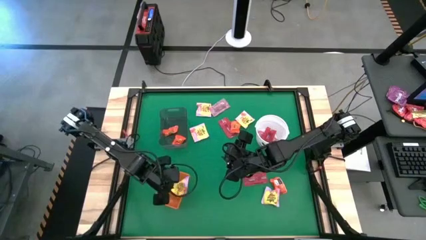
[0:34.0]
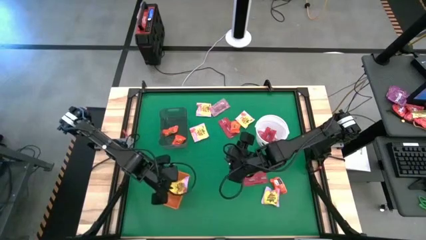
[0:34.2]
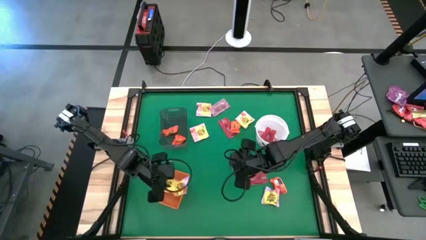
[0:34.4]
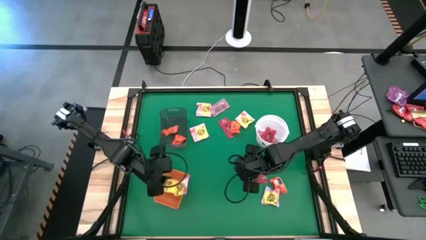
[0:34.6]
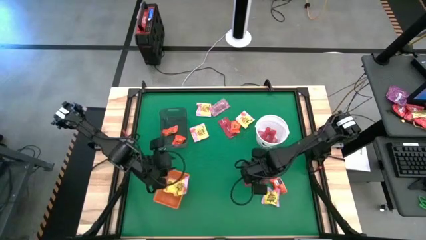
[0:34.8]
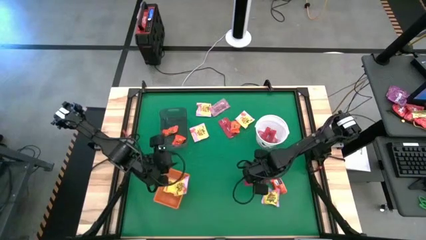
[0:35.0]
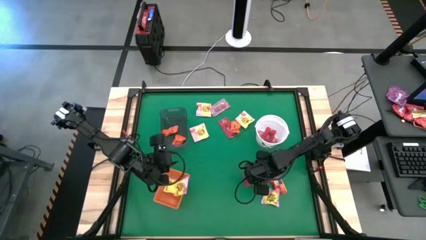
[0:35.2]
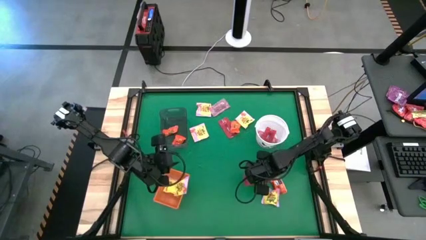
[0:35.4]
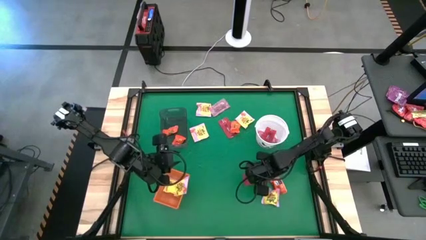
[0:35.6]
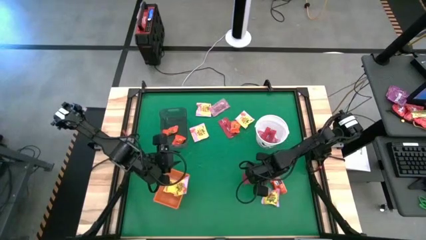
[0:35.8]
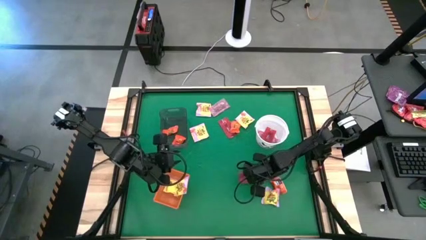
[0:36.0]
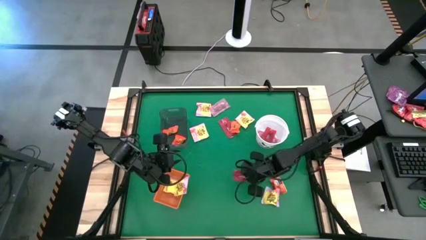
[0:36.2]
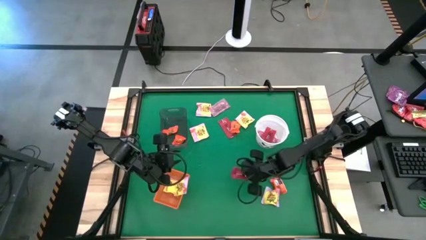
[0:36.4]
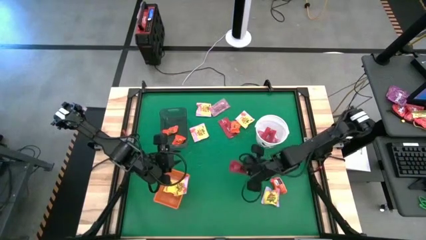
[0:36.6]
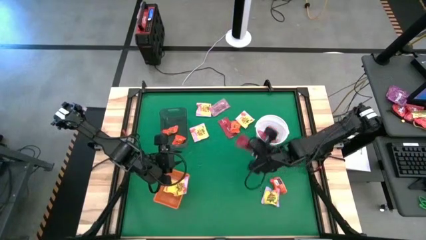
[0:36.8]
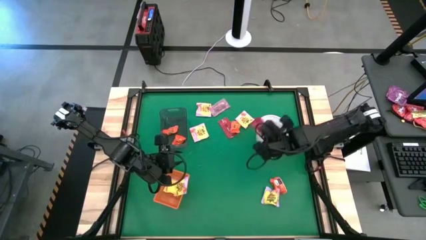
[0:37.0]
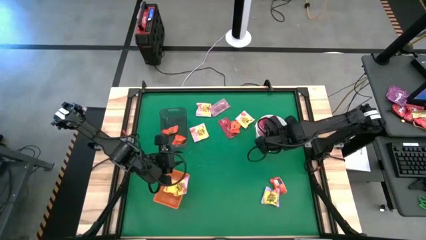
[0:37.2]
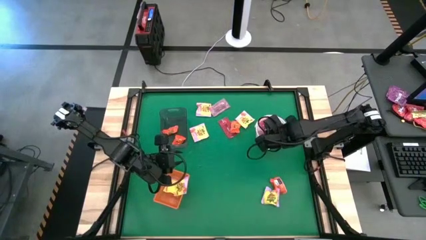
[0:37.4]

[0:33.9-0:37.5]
Task: Sort candy by brand, put in halloween buckets
Put the red candy into the white bucket

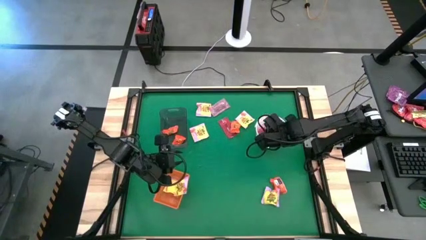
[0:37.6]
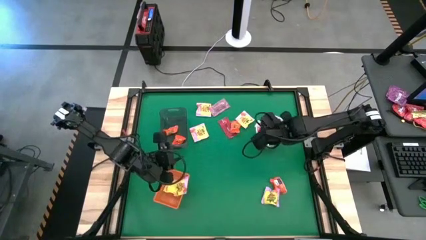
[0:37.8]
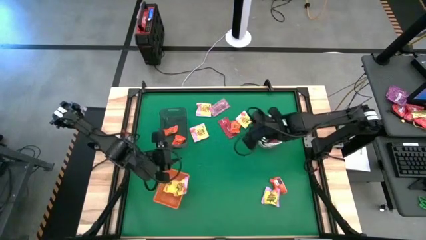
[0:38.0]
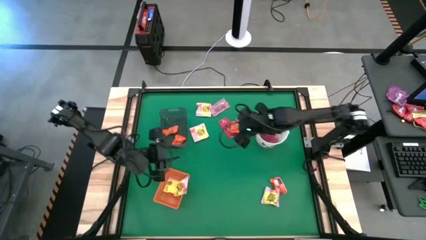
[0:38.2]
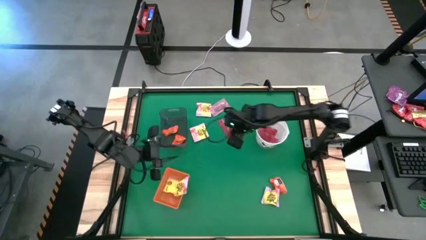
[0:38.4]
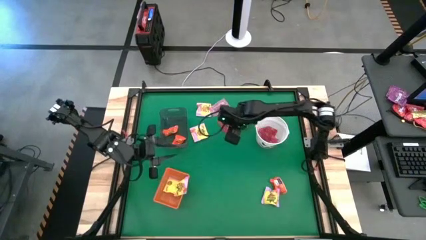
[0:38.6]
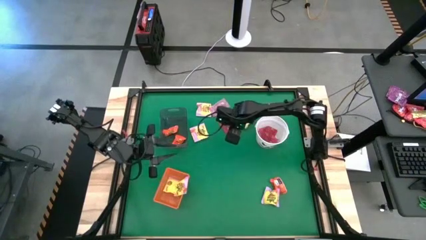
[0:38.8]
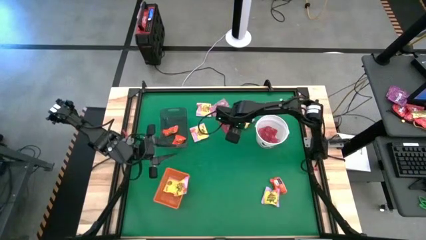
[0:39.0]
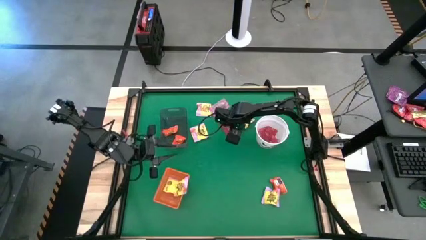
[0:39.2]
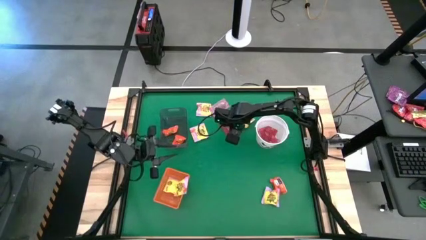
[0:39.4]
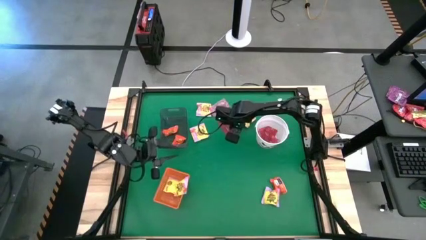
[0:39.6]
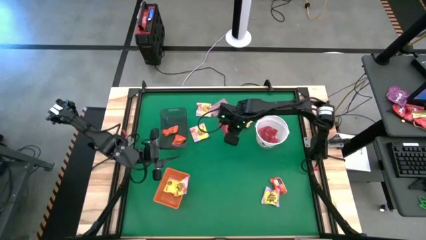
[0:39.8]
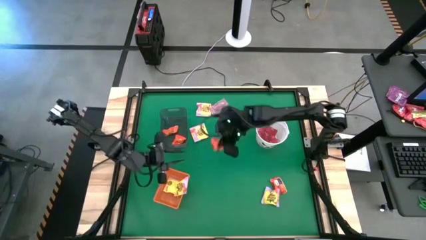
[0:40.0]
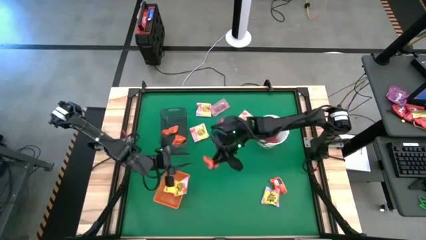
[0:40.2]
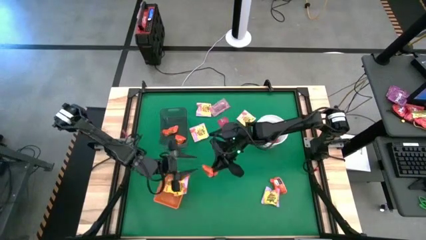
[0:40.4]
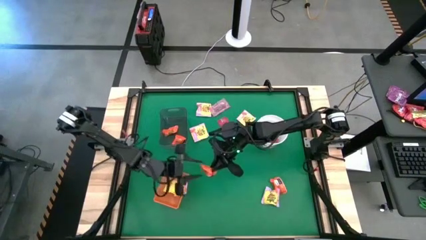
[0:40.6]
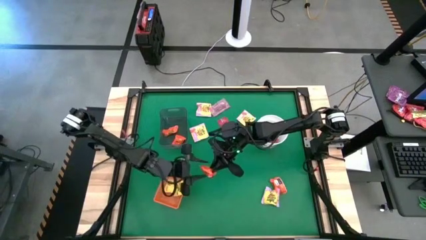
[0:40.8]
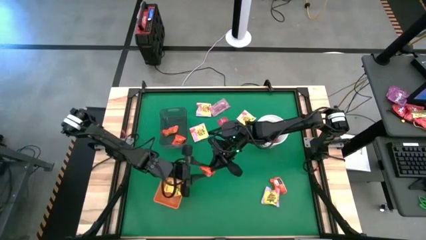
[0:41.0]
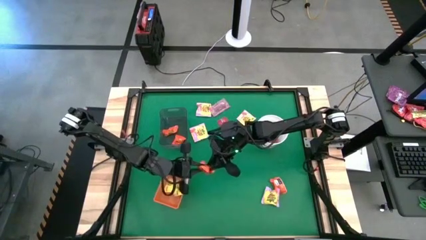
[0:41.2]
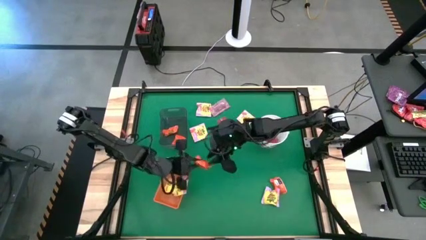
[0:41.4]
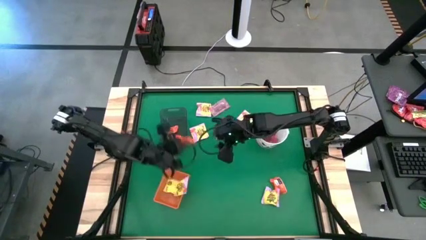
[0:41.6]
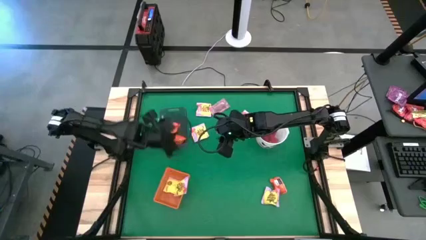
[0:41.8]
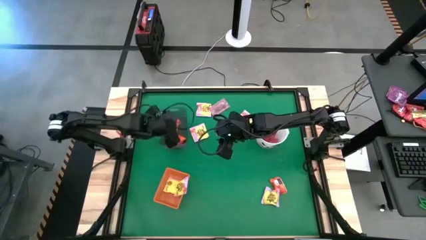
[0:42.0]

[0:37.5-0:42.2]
Put the orange candy into the black bin

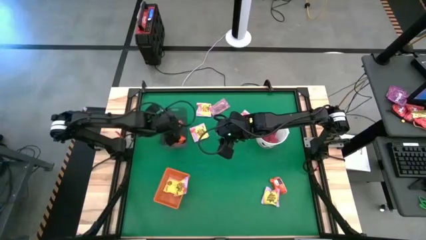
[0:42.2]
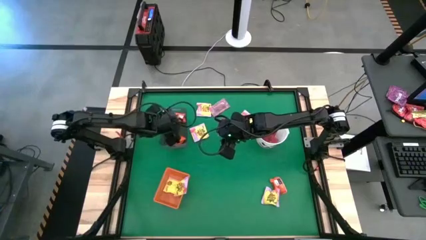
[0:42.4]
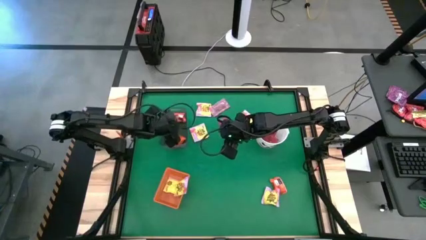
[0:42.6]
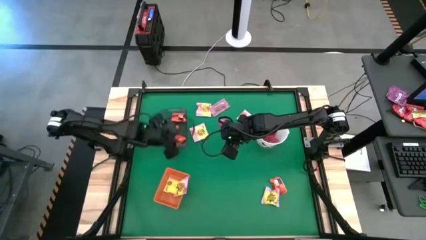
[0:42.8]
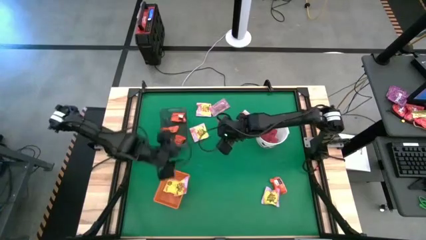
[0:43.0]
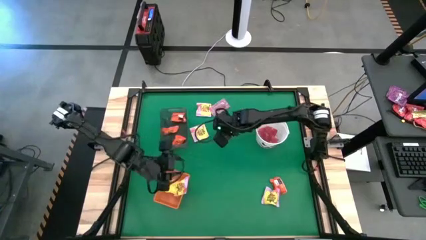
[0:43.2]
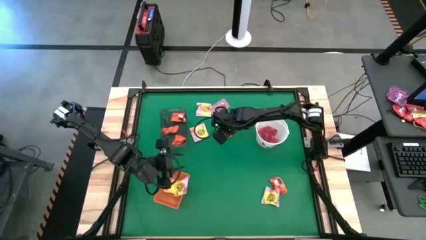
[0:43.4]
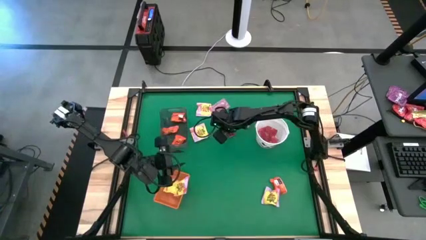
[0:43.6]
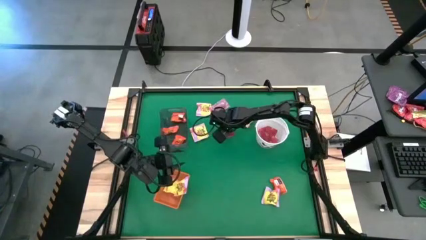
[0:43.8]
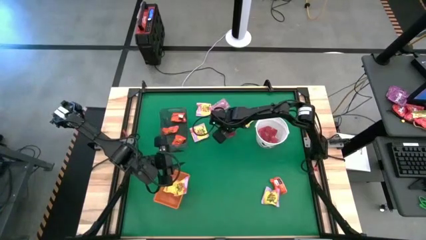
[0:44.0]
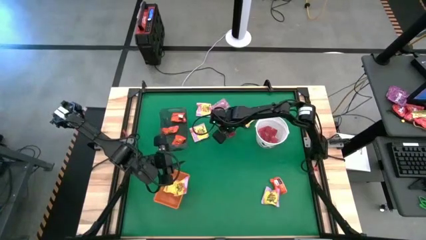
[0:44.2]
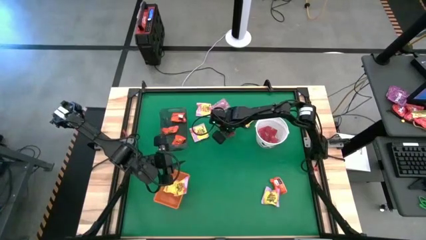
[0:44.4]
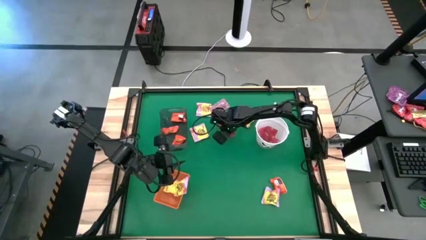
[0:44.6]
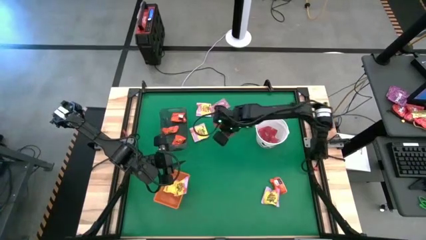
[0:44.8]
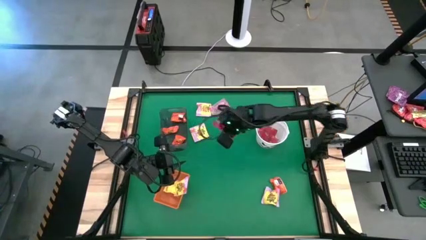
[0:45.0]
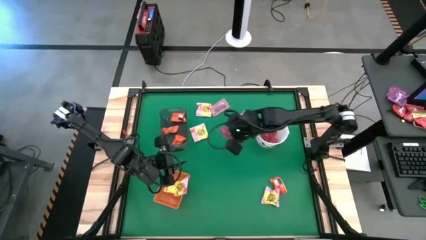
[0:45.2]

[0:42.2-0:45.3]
Put the red candy into the white bucket

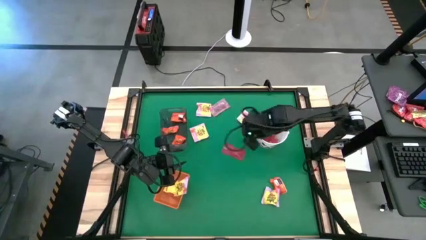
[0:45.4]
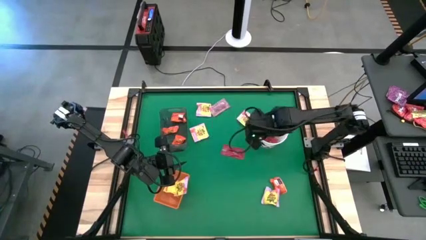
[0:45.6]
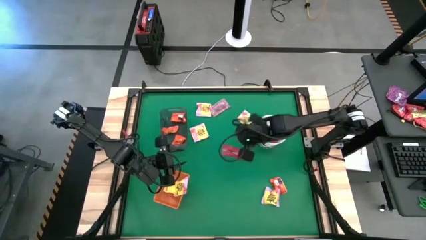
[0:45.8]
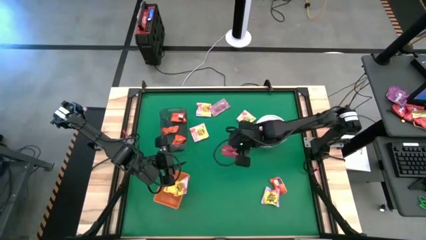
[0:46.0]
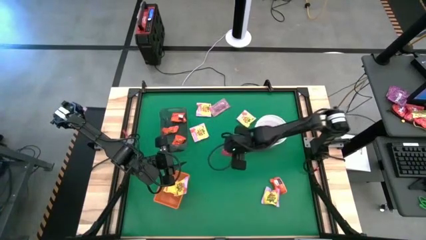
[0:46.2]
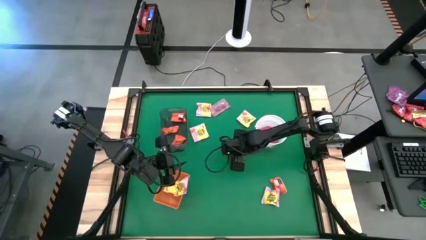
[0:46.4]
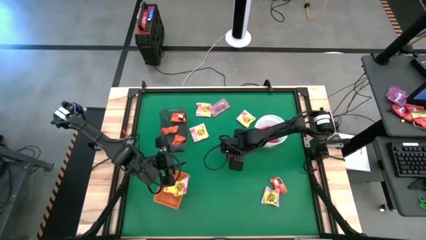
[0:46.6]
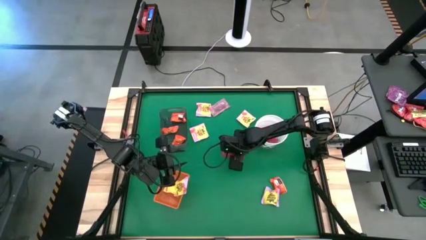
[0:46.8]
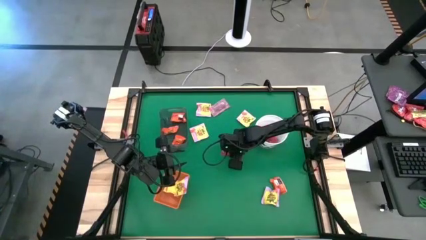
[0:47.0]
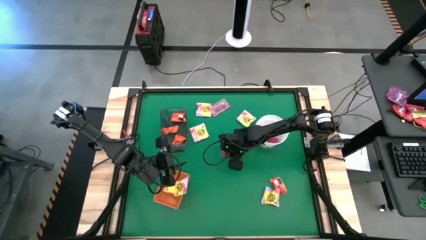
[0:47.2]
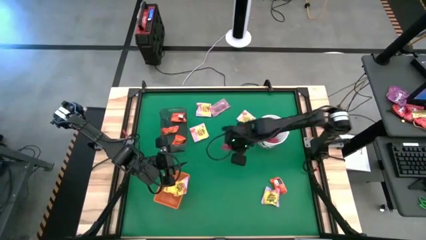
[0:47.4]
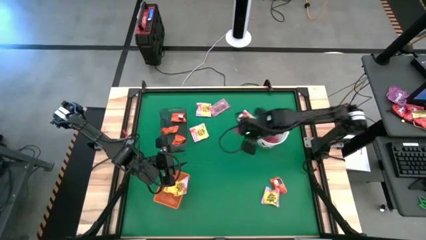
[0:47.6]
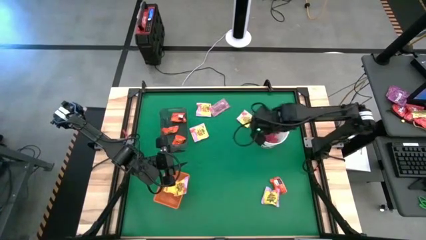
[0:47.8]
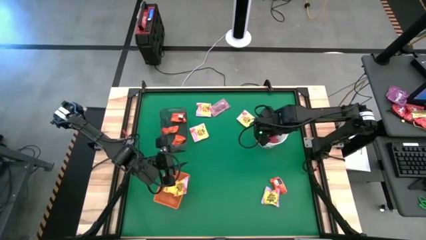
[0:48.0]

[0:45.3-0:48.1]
Put the red candy into the white bucket

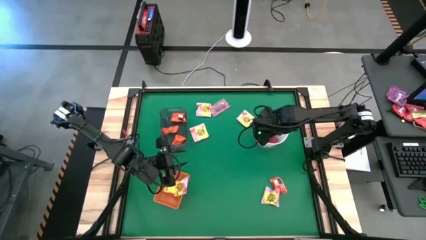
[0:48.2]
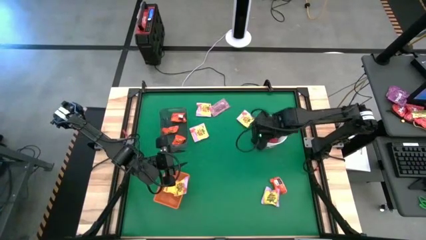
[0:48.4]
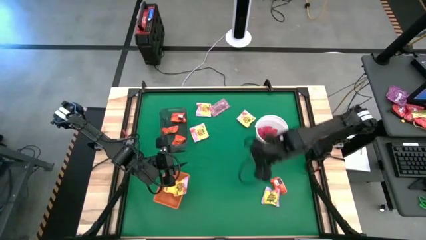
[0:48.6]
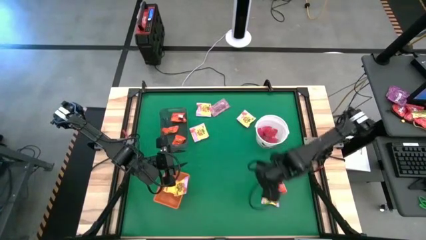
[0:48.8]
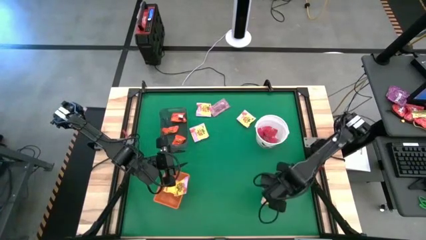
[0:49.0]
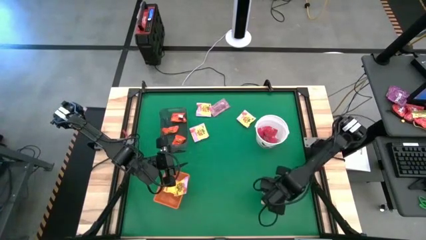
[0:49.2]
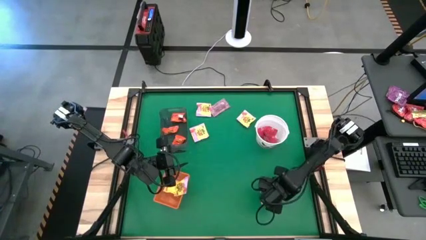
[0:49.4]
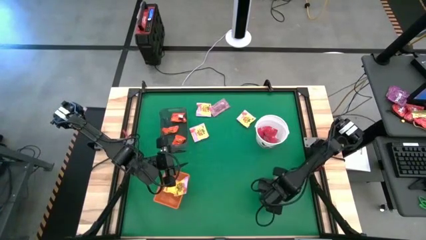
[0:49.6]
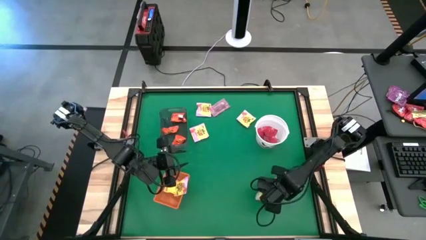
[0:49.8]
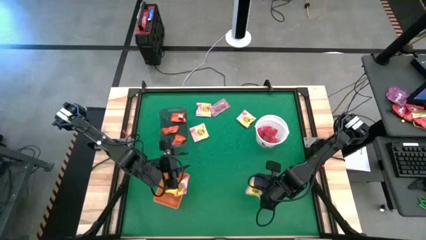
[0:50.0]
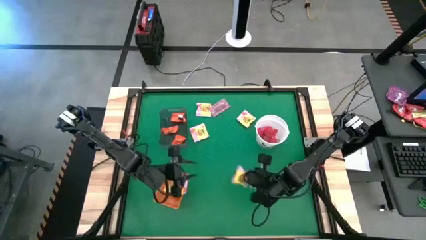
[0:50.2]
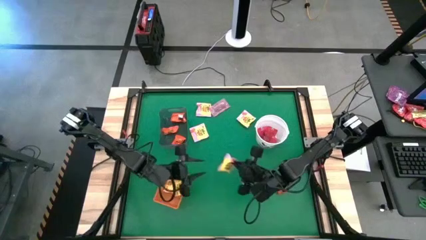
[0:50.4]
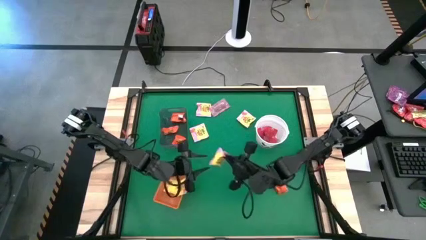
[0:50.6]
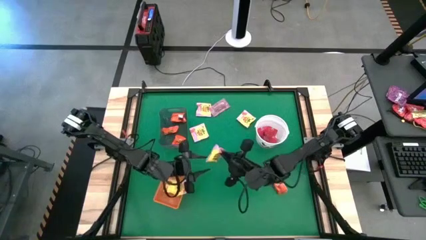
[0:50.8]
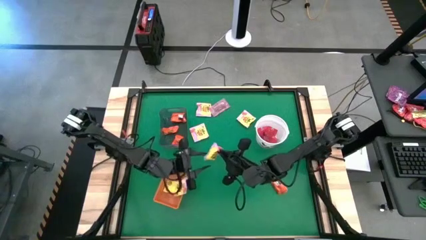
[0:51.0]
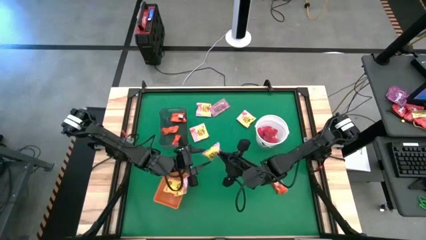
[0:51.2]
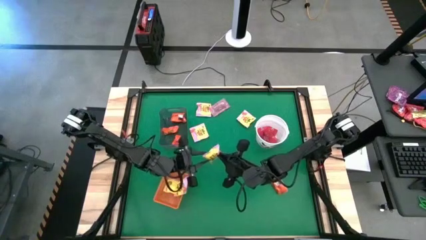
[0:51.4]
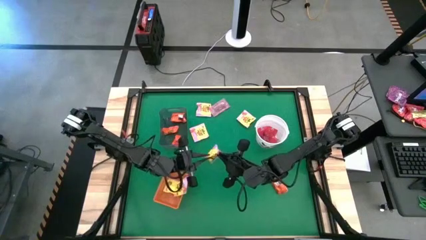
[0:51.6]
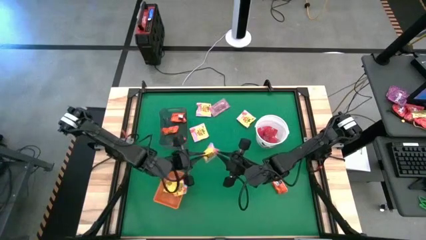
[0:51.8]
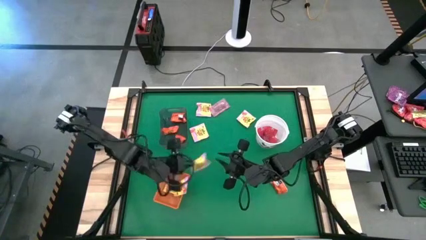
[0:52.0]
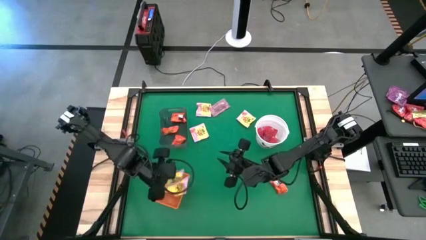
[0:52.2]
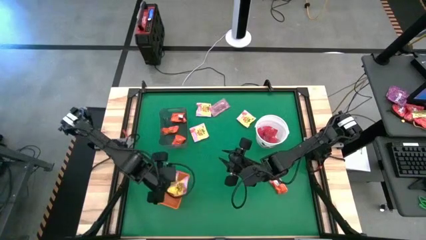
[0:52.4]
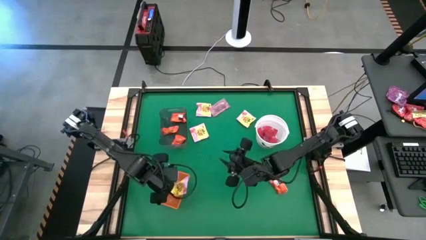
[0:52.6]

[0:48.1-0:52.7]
Put the yellow candy into the orange bin
